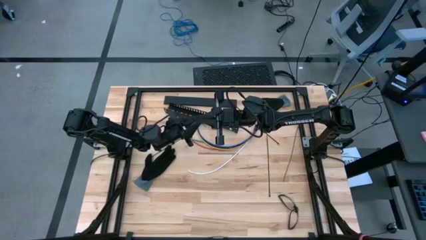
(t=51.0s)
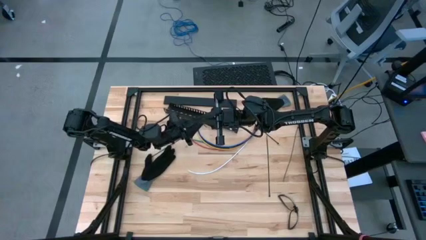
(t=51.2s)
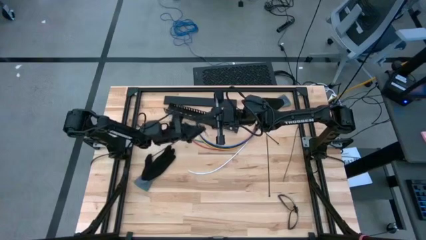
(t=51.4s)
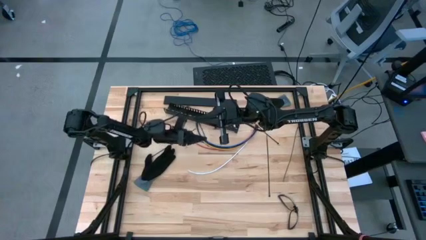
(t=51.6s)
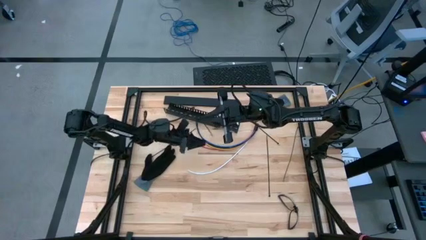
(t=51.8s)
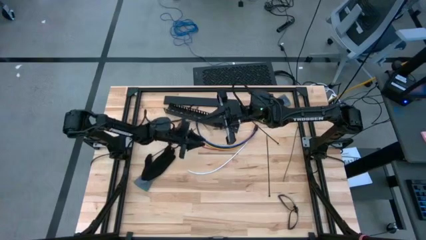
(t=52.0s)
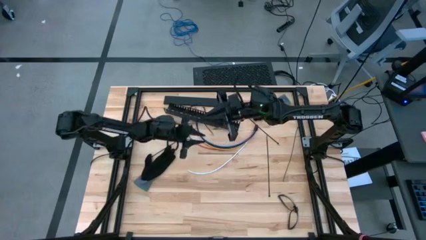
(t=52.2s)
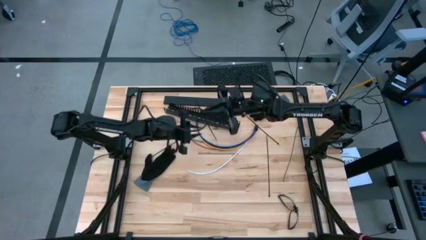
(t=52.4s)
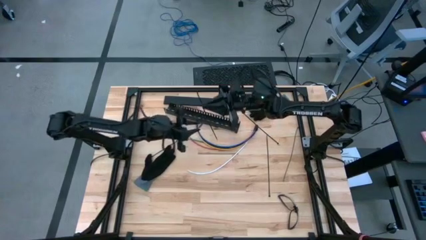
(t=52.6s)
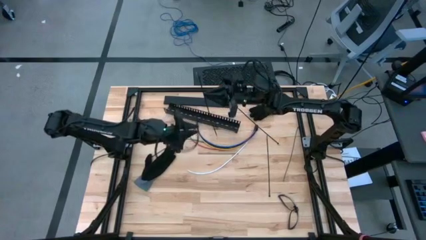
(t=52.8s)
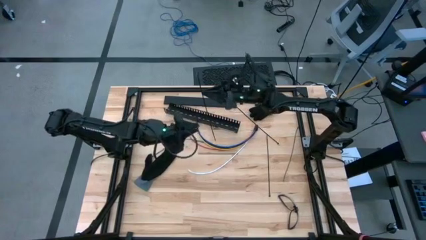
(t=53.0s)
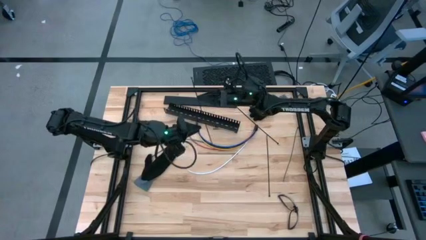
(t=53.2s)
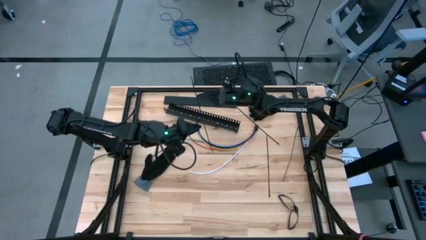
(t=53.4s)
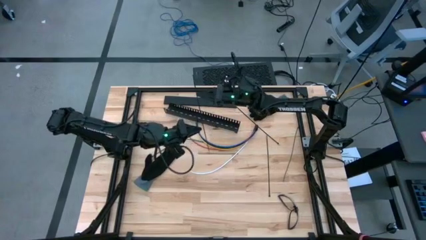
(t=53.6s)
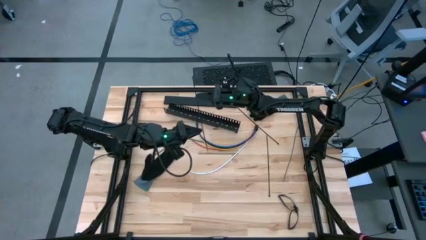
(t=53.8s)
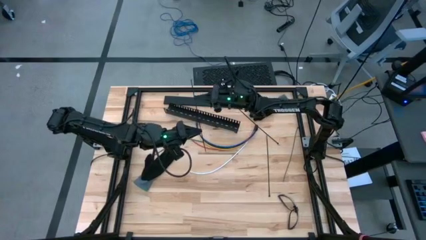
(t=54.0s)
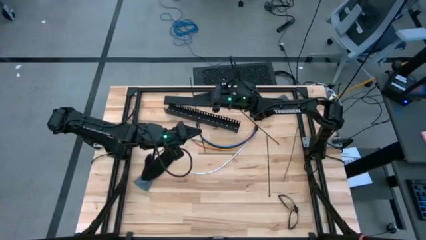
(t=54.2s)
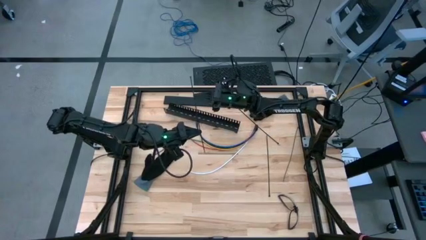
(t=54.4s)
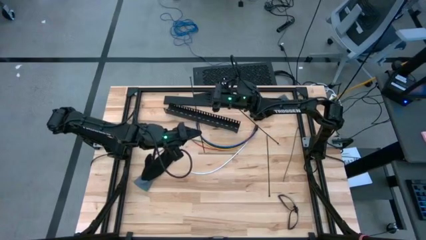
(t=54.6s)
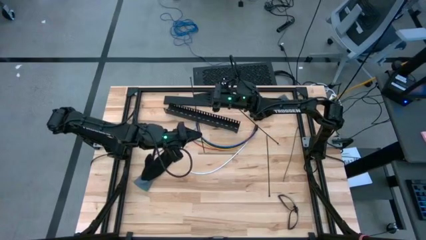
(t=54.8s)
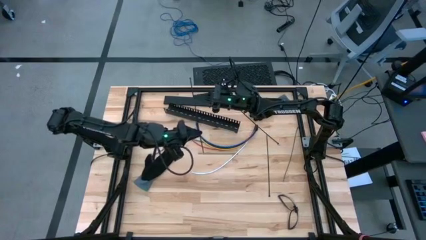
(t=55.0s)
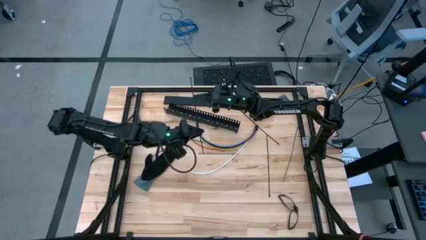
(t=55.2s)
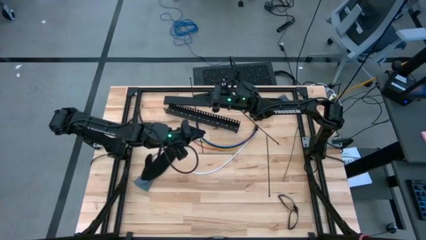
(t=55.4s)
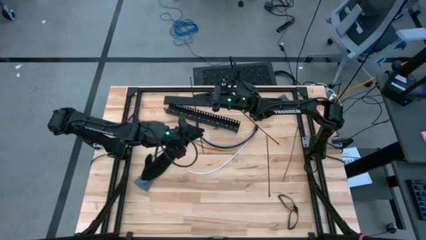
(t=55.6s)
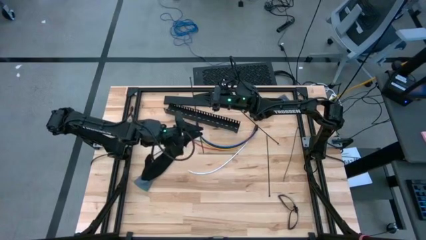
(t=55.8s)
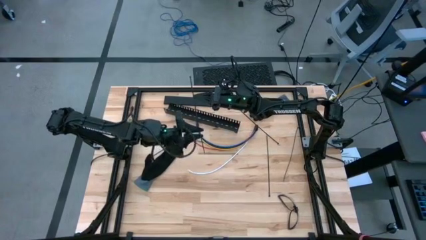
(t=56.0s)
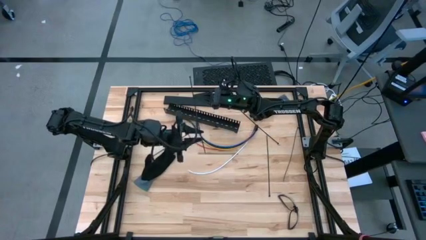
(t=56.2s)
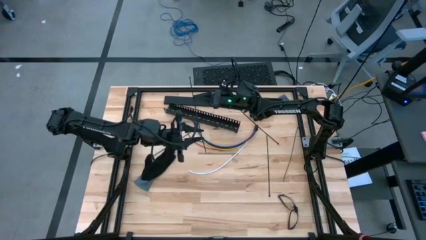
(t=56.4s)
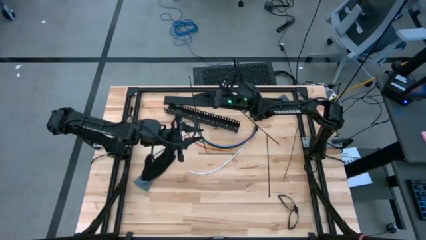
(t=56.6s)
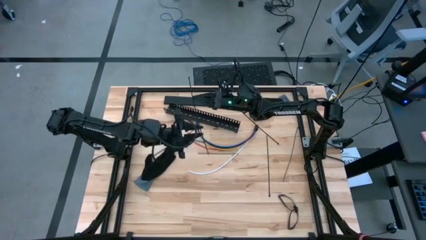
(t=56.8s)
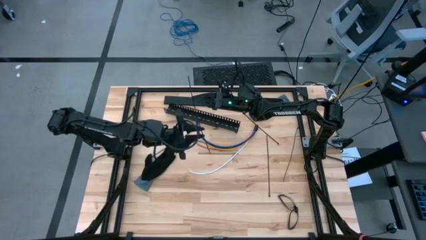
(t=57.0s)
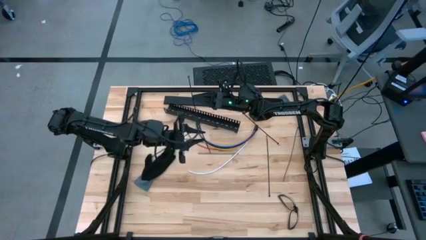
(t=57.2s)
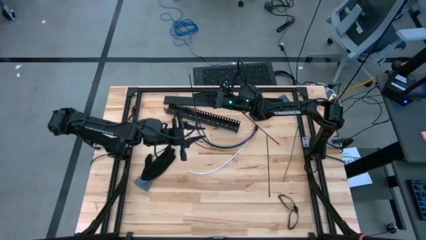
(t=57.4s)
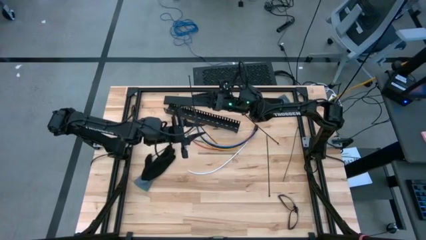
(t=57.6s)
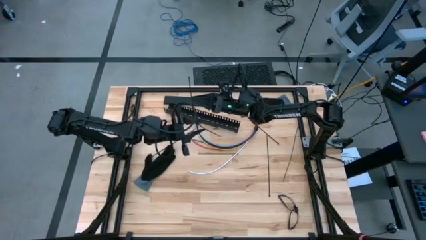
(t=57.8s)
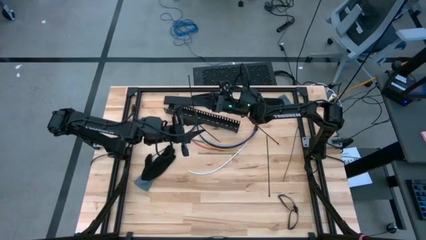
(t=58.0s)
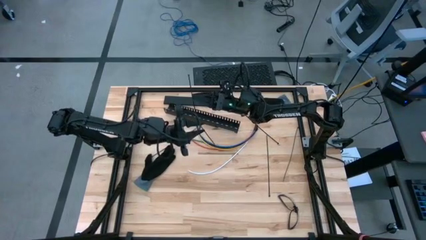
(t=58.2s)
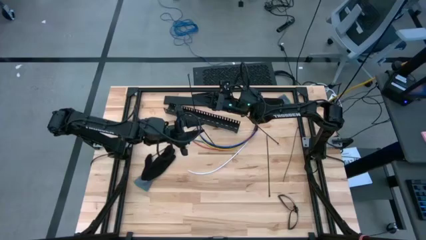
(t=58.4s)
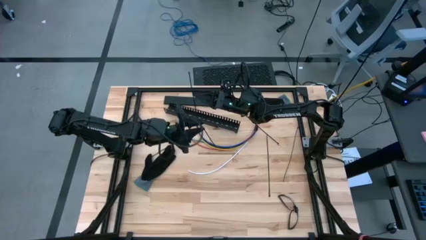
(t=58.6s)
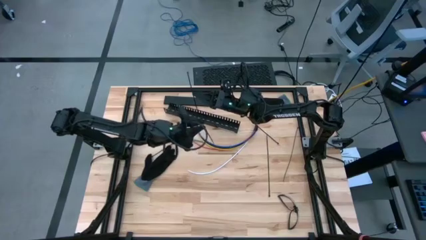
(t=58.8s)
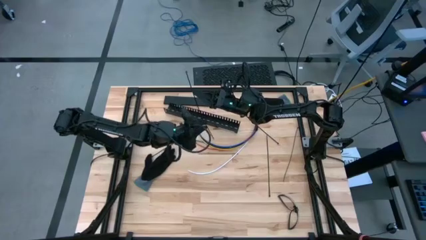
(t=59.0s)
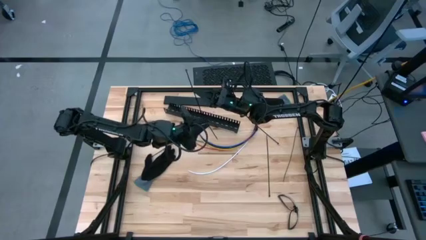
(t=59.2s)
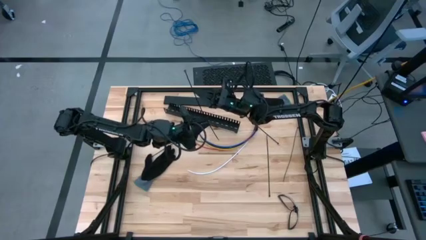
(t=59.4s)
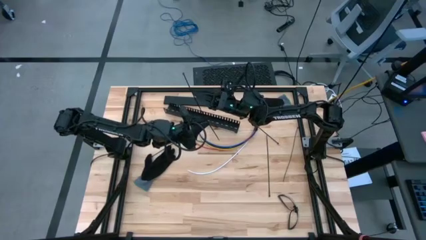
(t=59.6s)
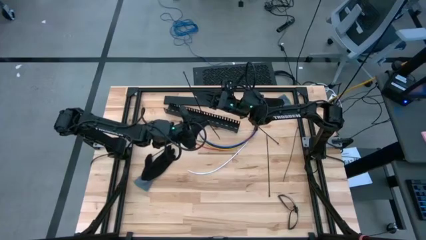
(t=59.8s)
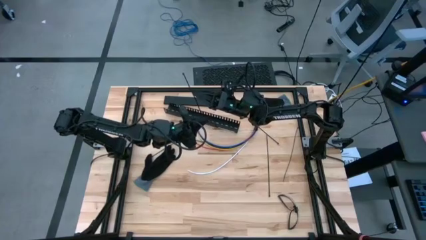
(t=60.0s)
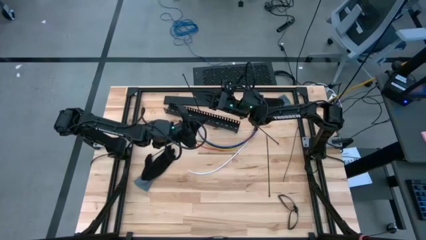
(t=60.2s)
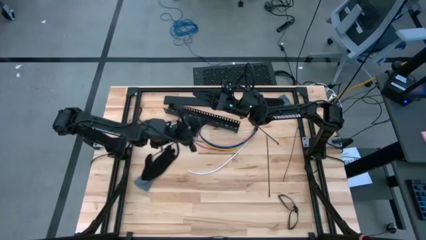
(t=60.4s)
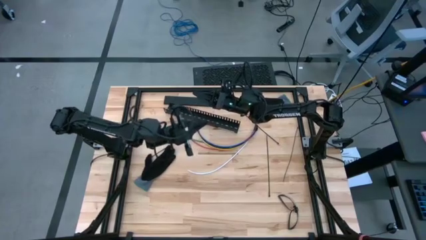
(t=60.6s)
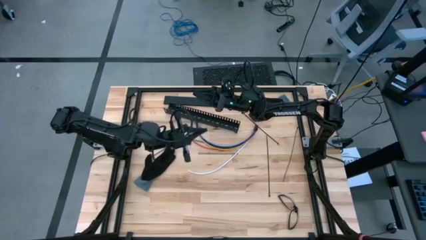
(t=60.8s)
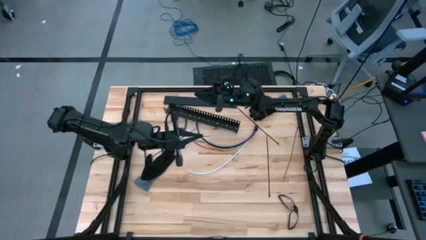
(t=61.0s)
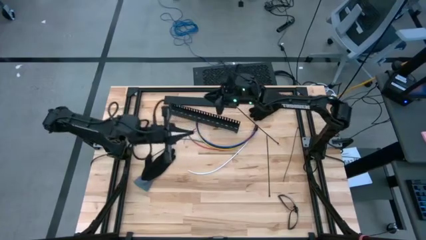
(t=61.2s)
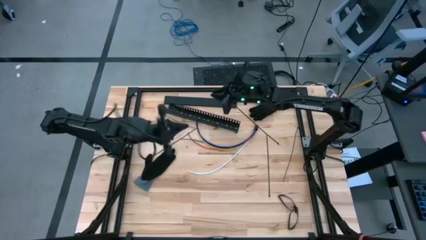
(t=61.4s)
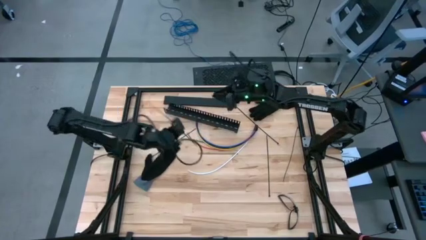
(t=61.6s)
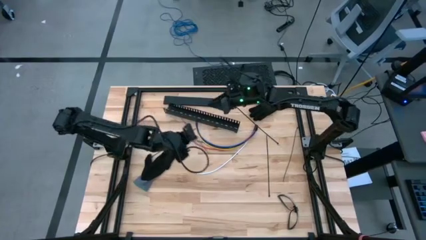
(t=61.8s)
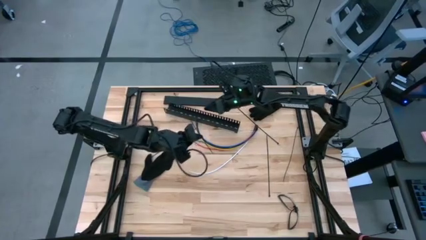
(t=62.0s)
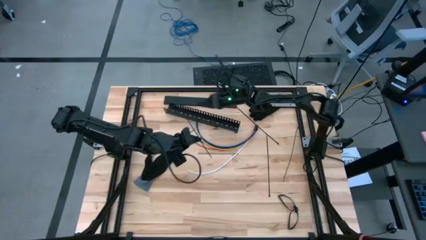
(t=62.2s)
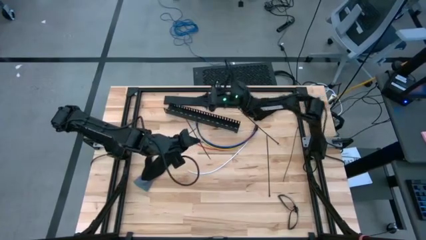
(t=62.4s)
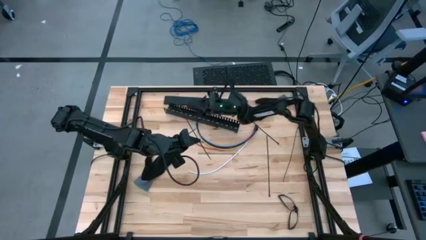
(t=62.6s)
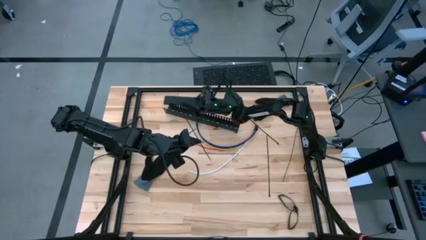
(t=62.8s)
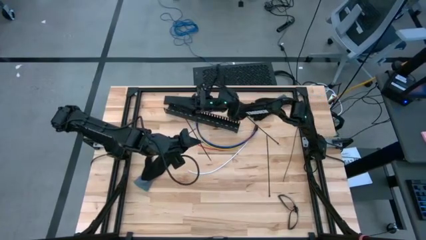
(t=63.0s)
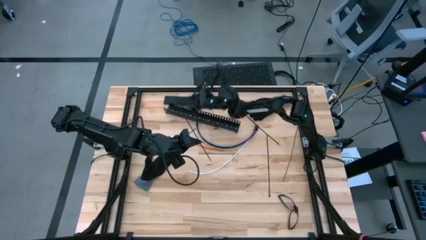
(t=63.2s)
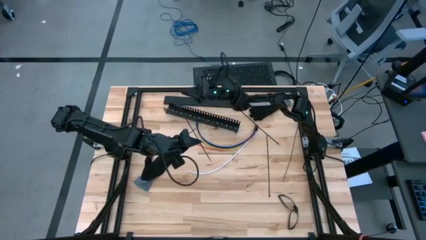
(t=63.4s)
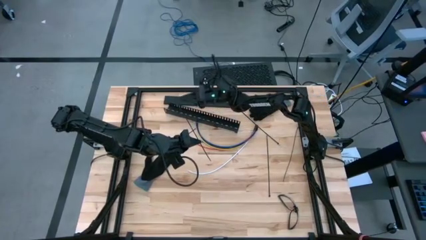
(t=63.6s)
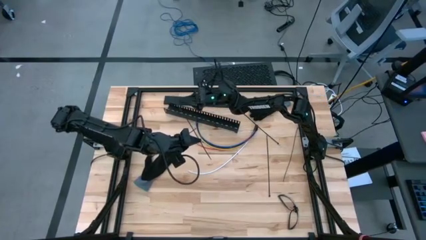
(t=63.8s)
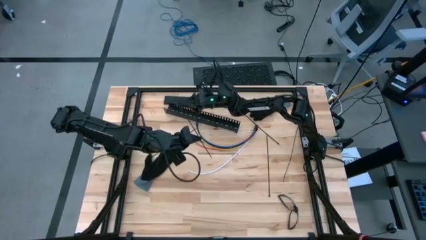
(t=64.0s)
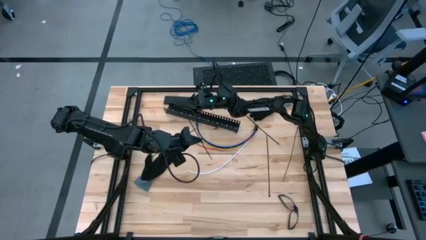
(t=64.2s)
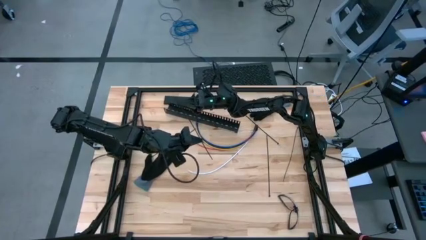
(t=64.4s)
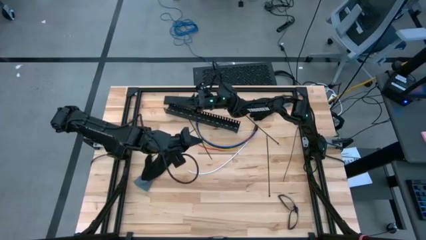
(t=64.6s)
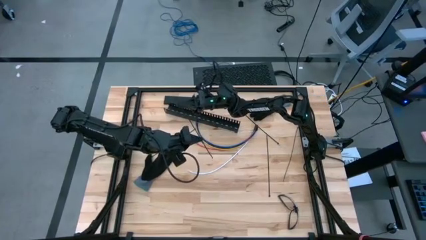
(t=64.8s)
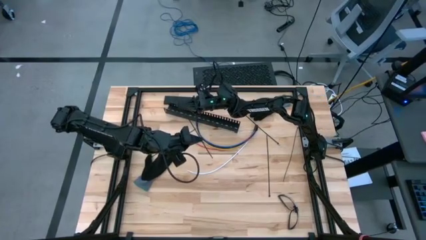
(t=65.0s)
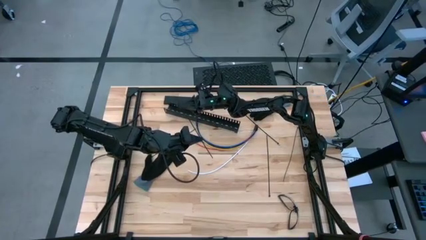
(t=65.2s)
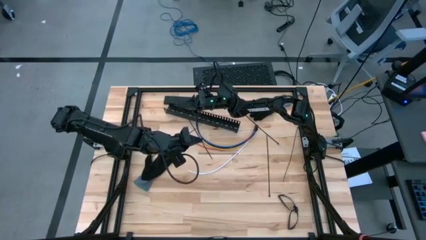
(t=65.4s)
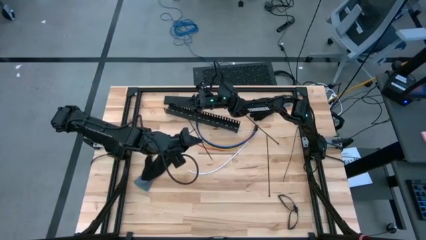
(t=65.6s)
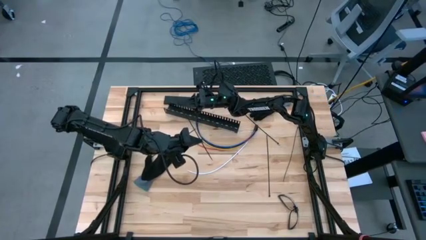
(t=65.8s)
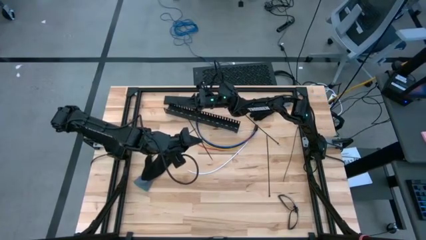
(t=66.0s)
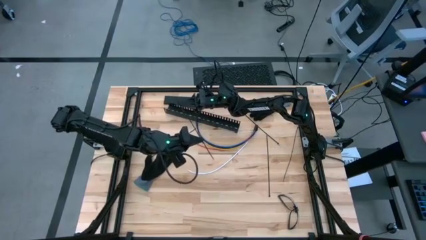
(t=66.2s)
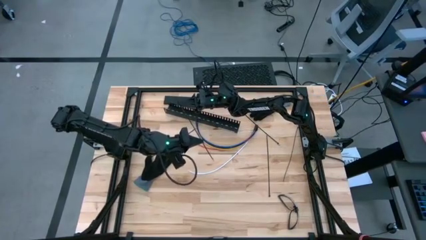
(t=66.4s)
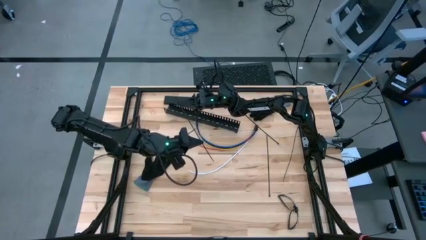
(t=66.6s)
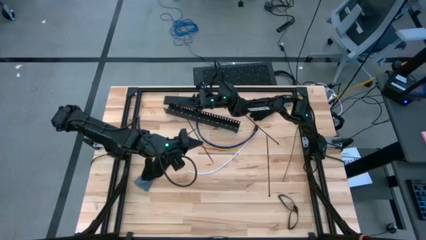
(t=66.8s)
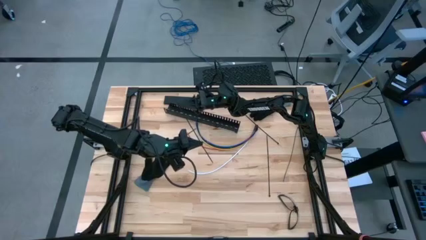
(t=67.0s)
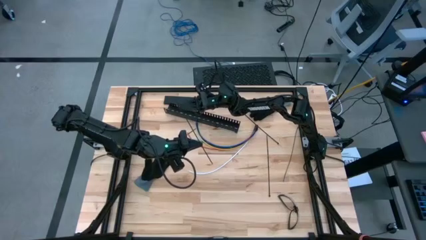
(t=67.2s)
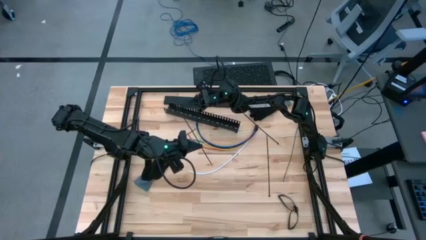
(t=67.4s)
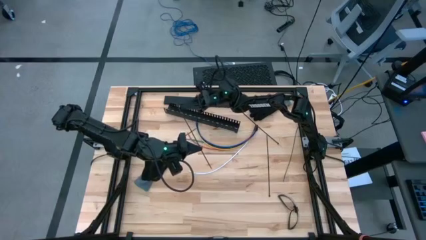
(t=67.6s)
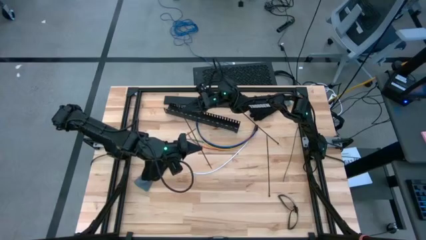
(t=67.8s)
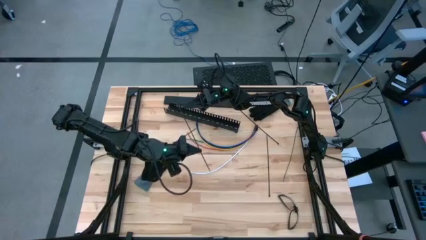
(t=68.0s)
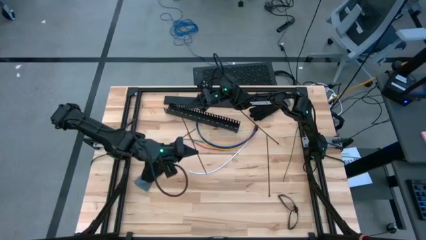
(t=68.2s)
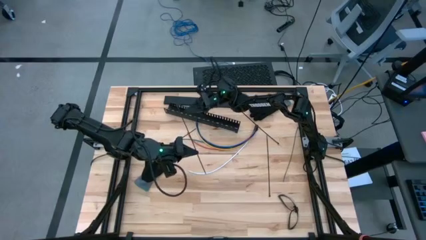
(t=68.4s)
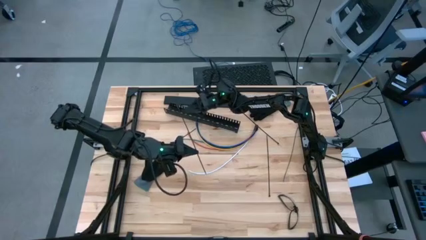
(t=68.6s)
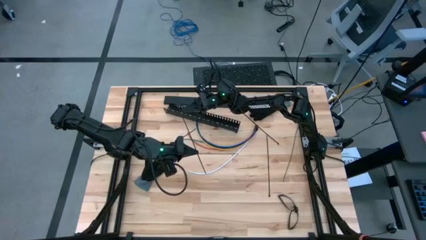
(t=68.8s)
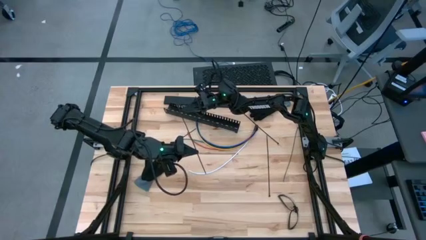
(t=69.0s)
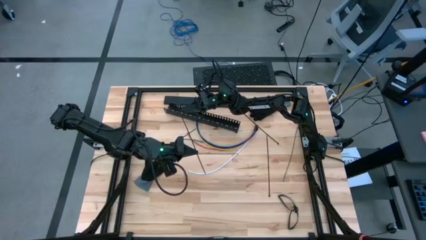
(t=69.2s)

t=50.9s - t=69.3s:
Task: Ziptie cables
Prepare the zip tie
